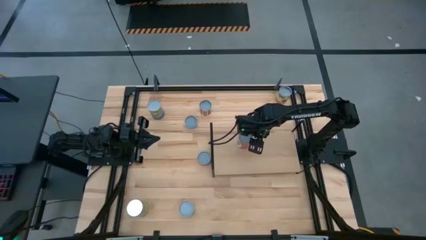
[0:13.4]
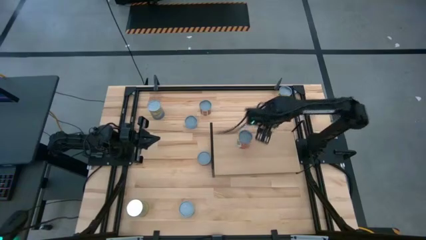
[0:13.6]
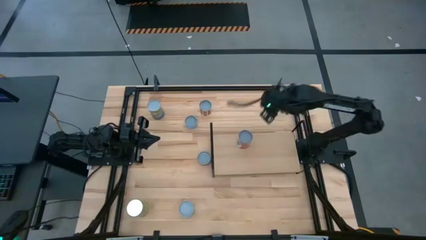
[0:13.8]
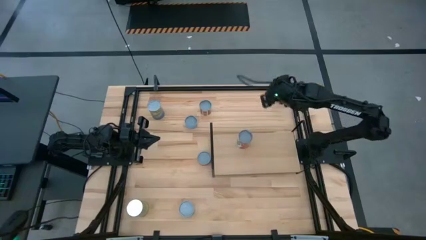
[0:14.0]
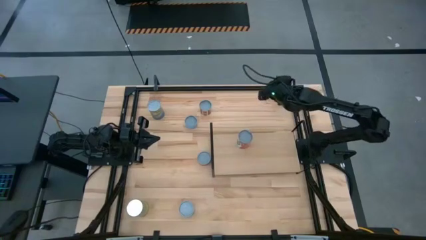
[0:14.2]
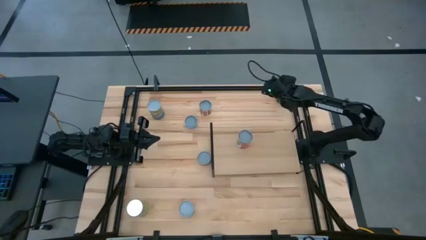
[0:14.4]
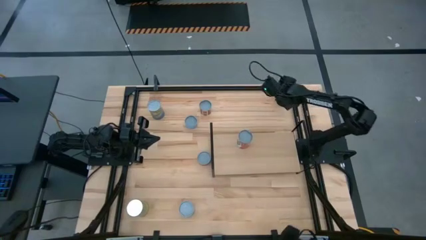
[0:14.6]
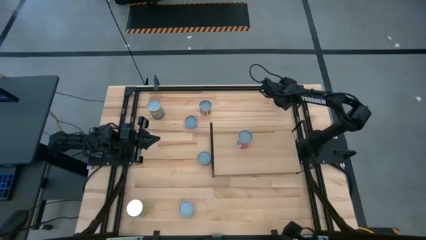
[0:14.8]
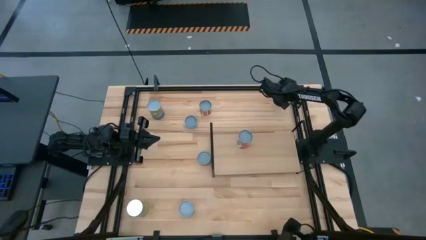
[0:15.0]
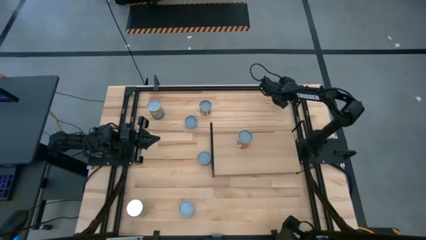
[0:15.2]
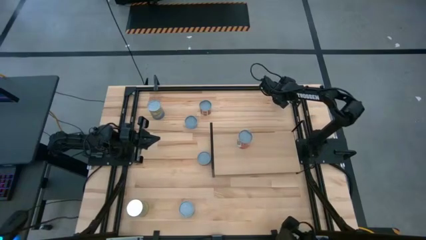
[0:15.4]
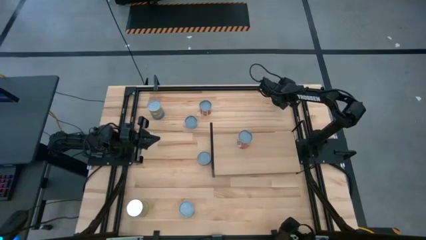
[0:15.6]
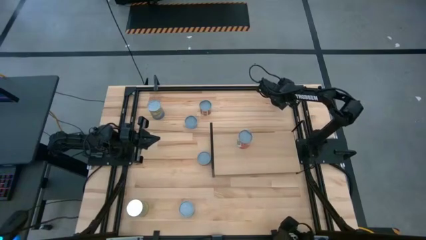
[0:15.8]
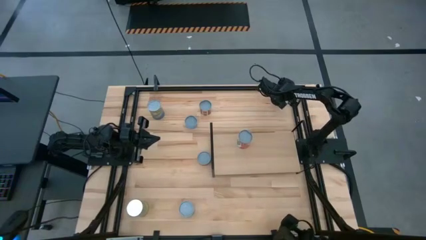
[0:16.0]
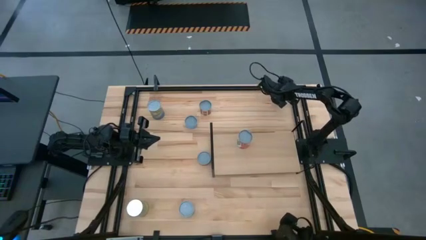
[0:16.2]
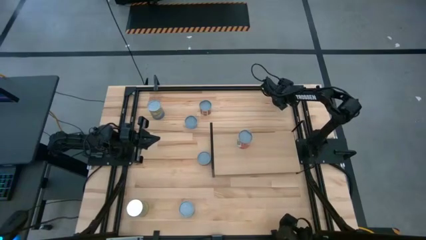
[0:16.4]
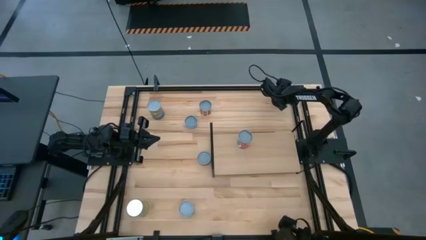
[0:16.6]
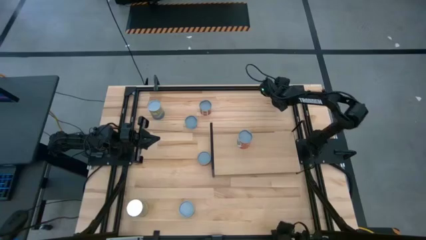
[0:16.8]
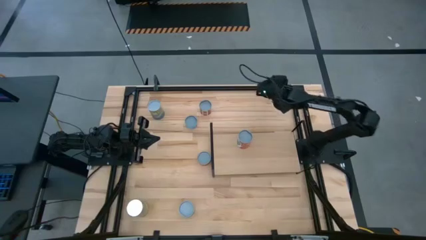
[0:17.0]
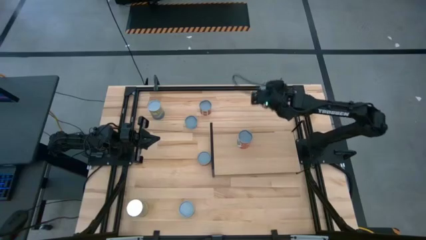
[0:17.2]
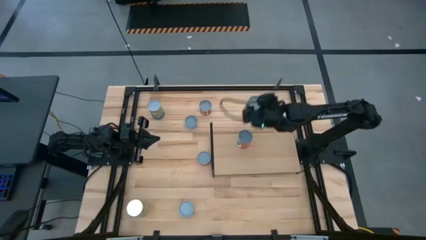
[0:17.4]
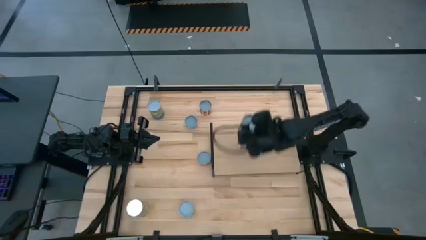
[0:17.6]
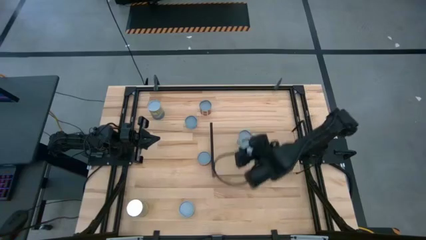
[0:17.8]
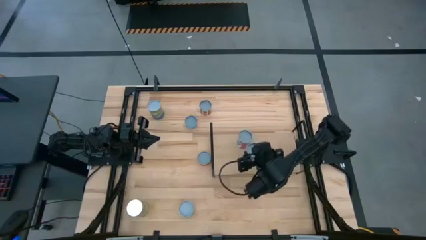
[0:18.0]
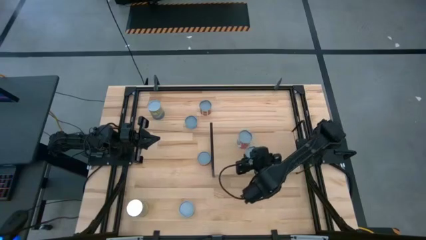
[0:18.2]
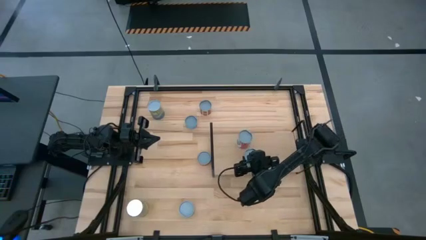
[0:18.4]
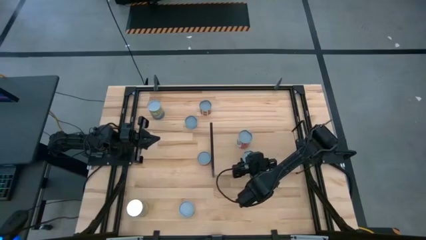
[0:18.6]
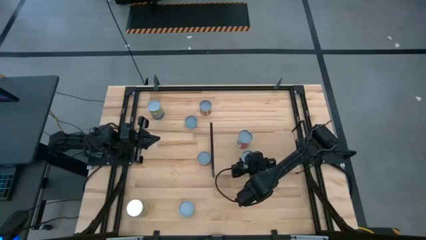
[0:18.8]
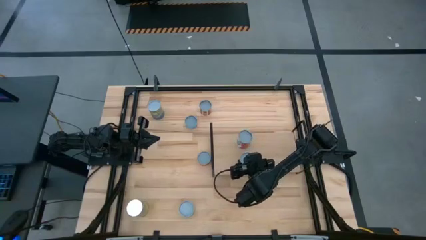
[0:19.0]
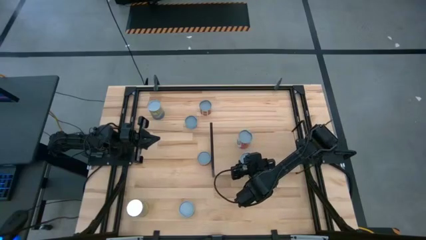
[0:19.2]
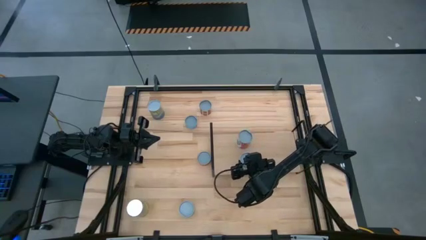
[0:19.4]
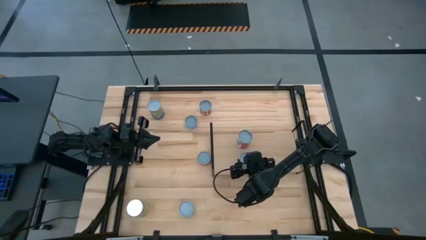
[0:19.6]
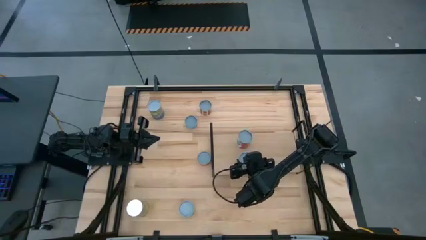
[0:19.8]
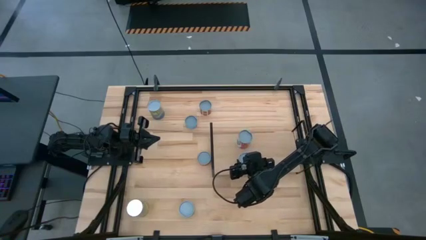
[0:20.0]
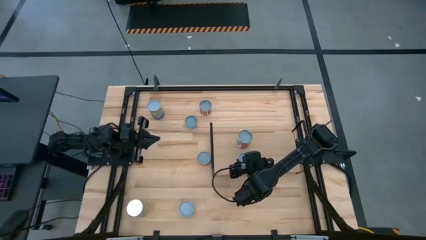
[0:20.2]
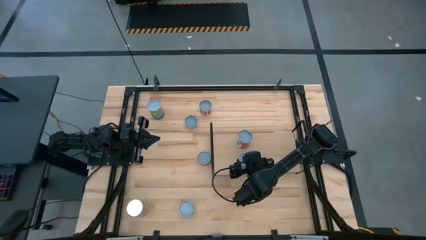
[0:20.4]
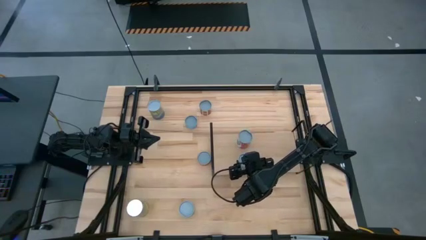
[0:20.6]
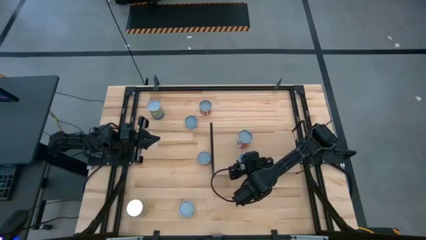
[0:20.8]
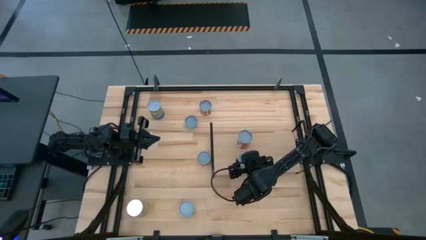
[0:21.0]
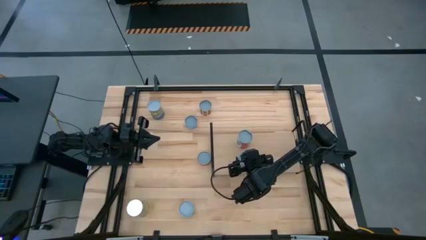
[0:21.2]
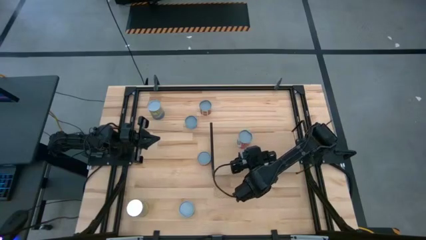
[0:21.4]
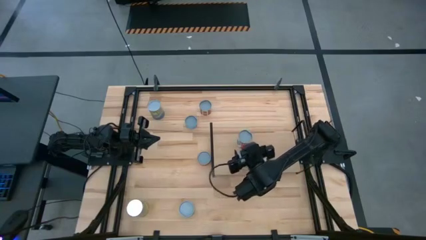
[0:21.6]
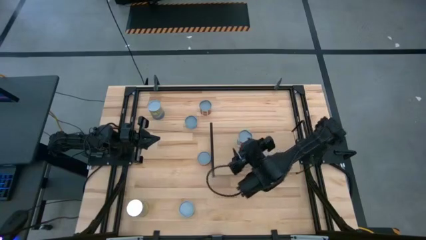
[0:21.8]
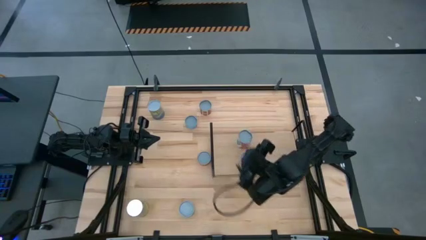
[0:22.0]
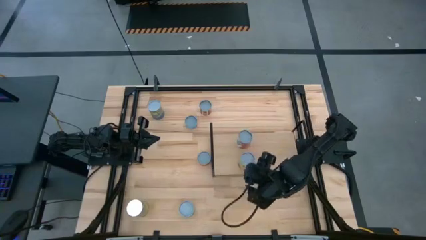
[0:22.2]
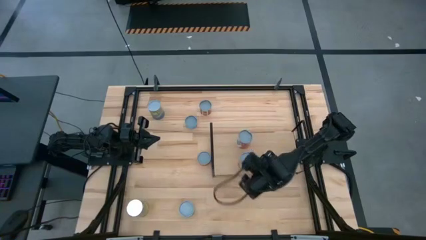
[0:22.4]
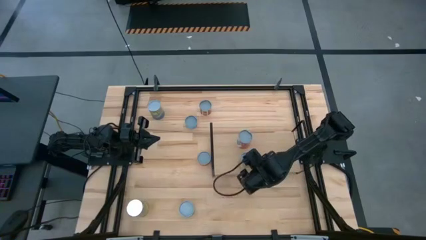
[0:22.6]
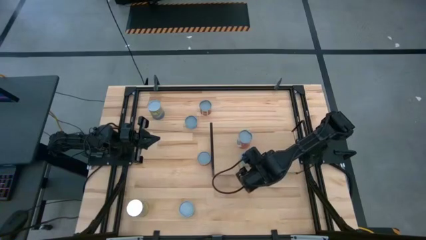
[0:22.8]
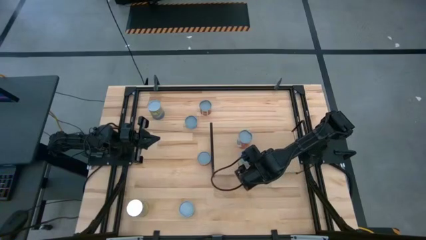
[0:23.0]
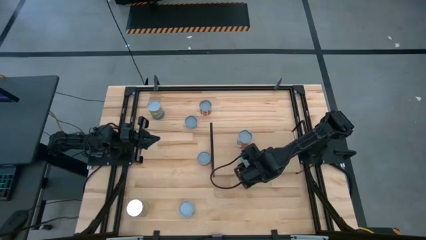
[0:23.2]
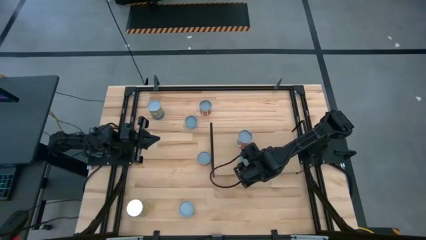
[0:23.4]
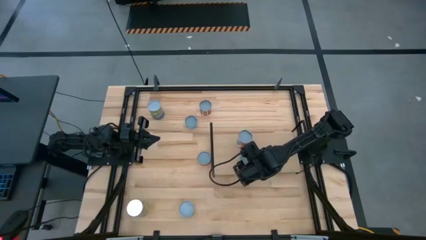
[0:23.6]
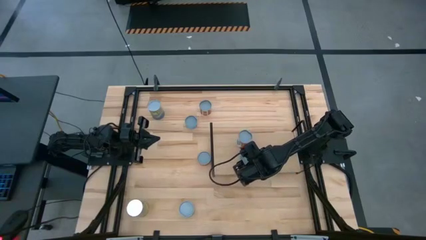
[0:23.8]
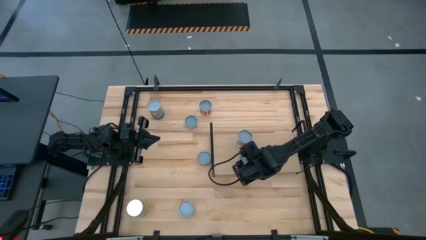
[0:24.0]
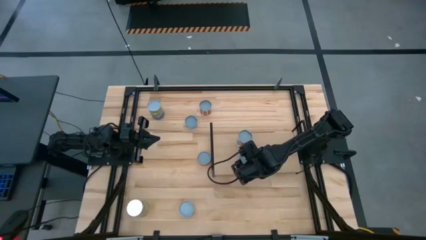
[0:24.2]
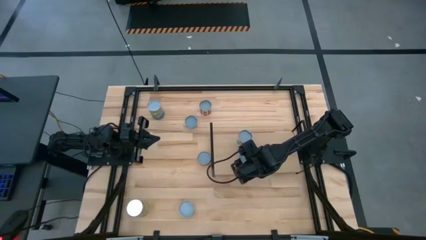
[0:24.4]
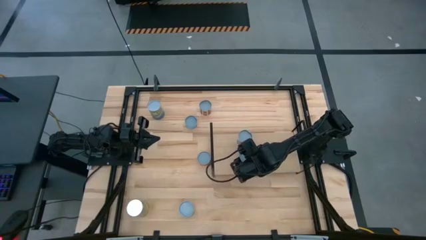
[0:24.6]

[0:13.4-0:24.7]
Task: Pick and place cans onto a shelf
Put the green can on the shelf
